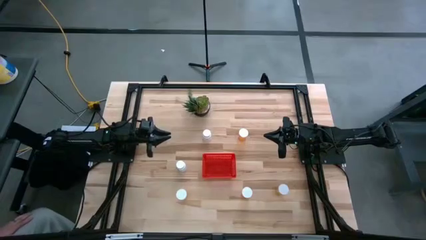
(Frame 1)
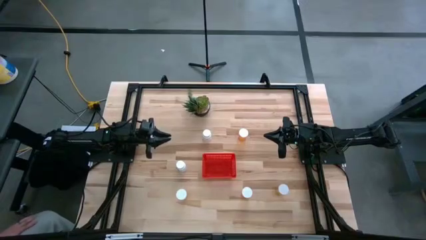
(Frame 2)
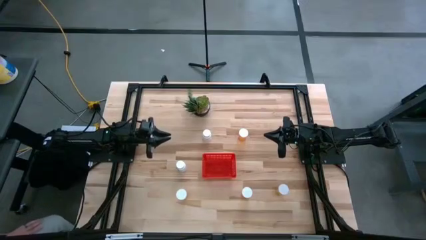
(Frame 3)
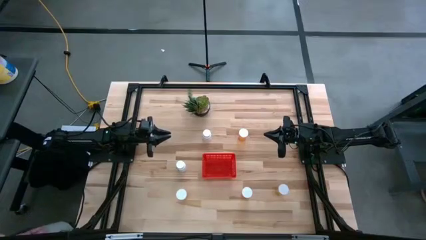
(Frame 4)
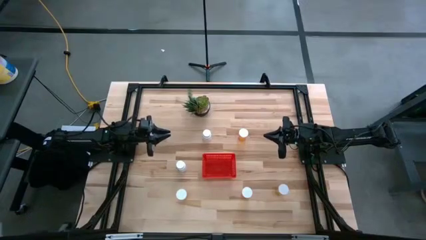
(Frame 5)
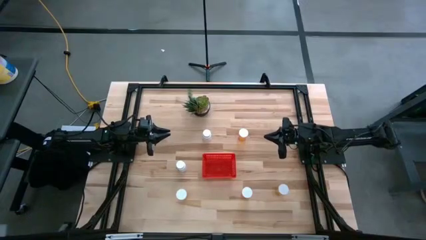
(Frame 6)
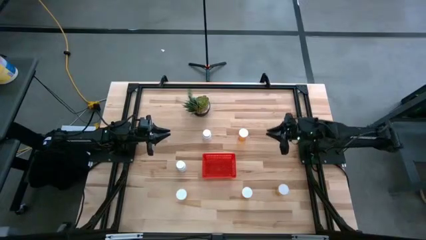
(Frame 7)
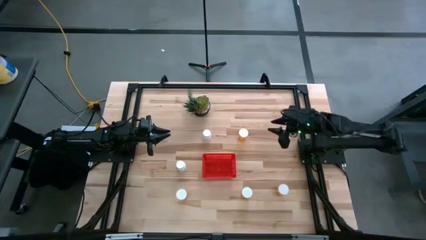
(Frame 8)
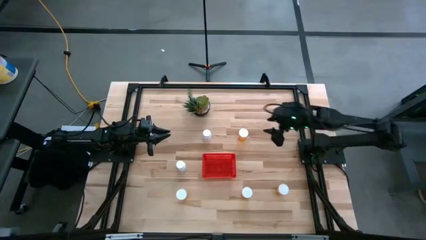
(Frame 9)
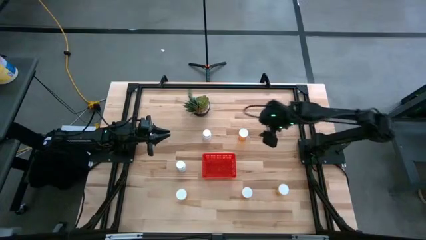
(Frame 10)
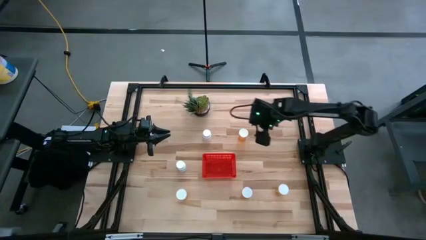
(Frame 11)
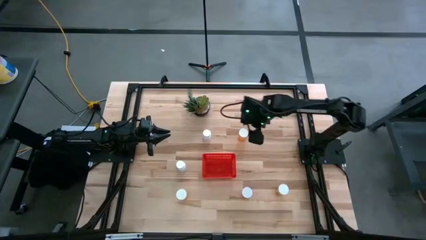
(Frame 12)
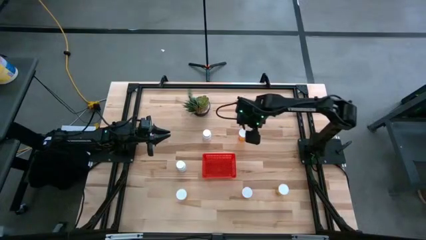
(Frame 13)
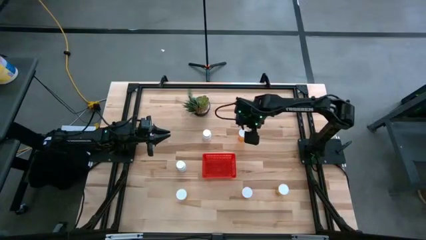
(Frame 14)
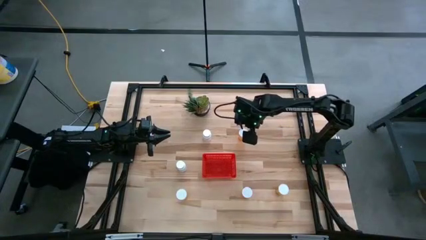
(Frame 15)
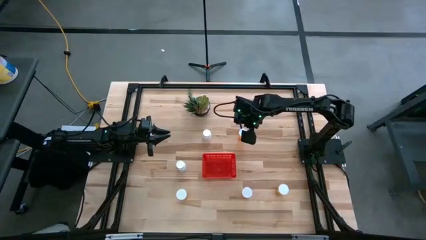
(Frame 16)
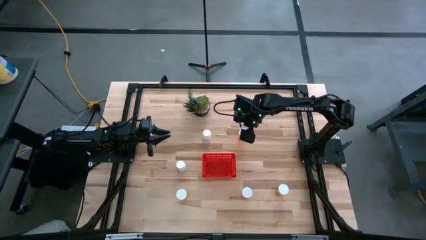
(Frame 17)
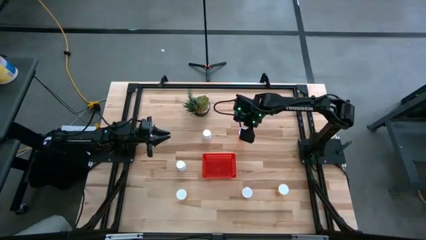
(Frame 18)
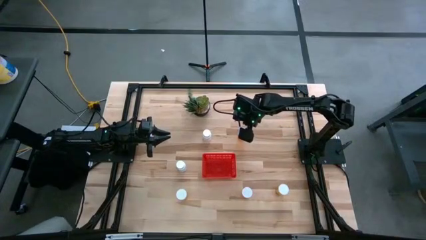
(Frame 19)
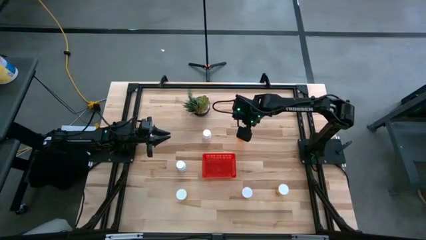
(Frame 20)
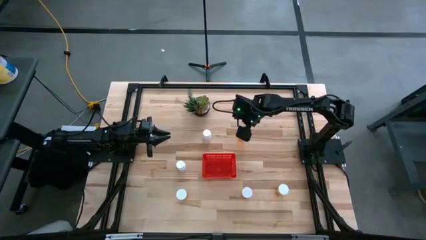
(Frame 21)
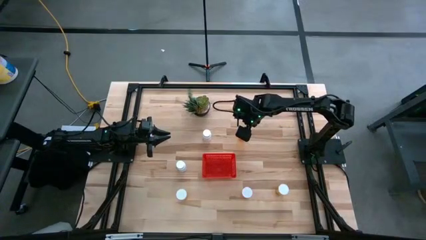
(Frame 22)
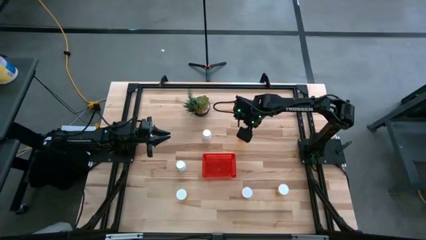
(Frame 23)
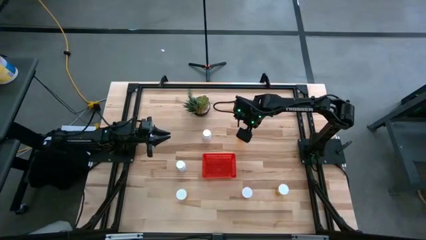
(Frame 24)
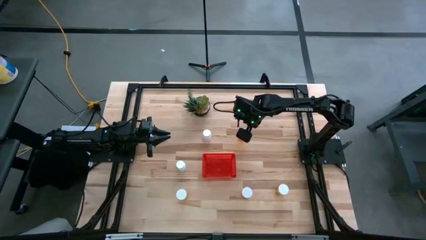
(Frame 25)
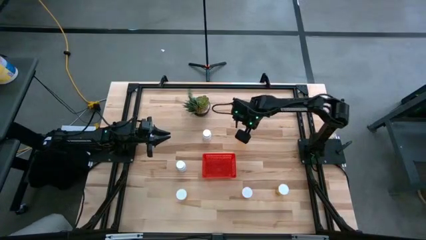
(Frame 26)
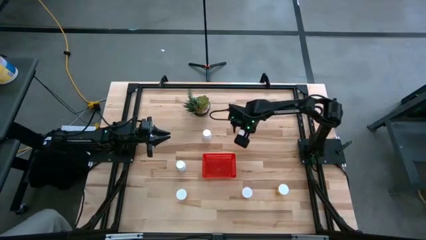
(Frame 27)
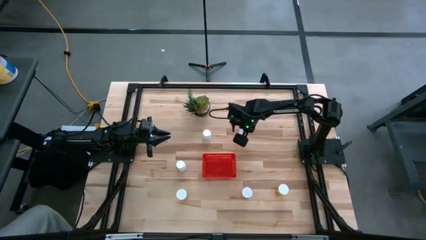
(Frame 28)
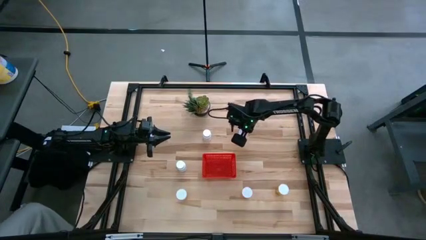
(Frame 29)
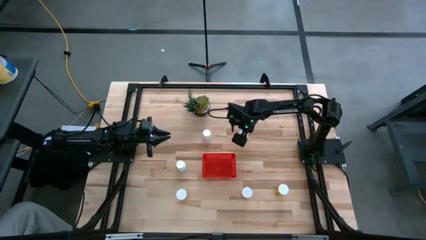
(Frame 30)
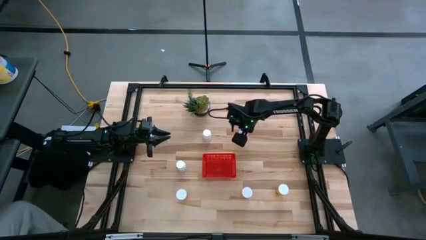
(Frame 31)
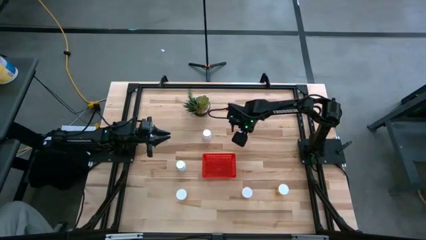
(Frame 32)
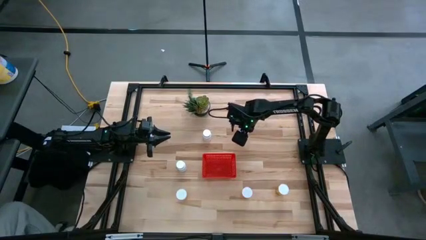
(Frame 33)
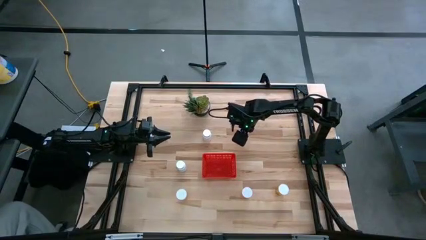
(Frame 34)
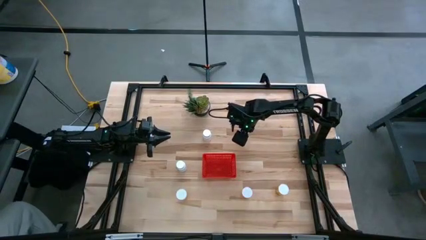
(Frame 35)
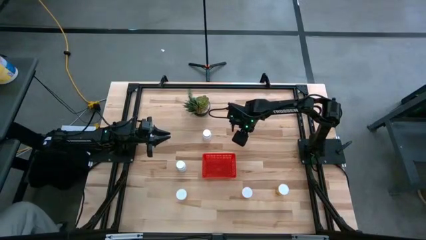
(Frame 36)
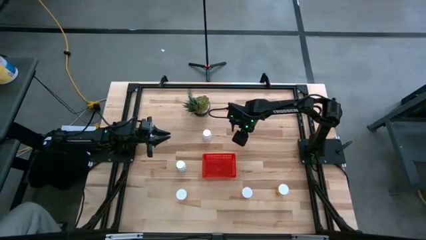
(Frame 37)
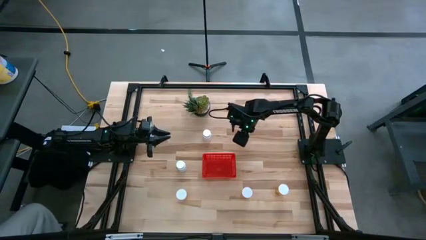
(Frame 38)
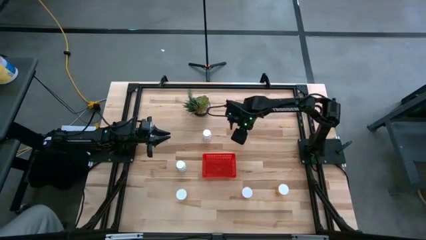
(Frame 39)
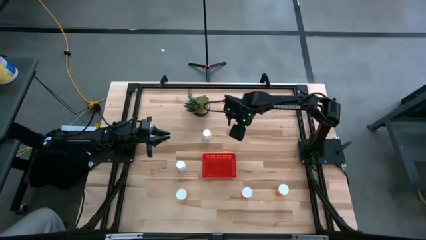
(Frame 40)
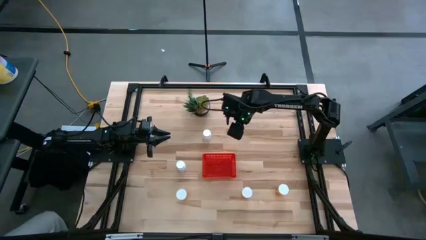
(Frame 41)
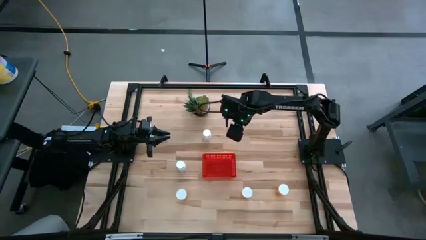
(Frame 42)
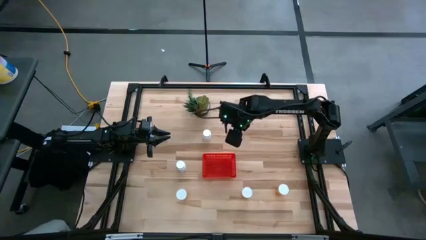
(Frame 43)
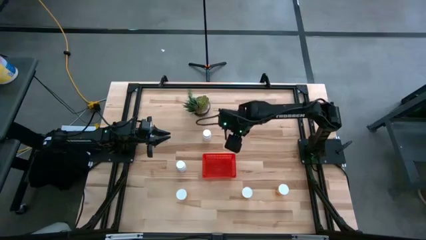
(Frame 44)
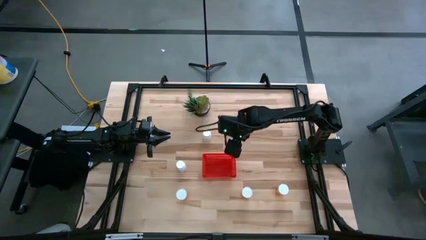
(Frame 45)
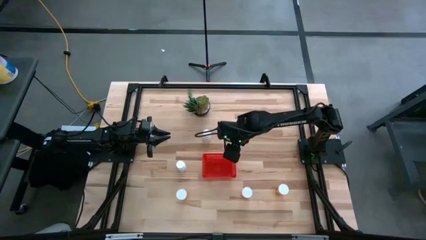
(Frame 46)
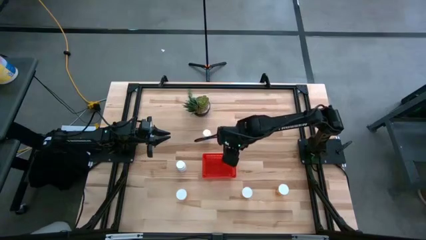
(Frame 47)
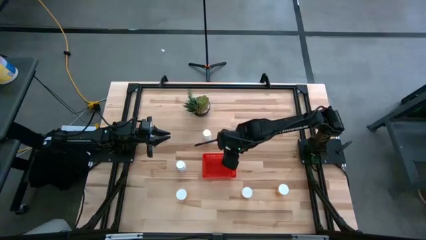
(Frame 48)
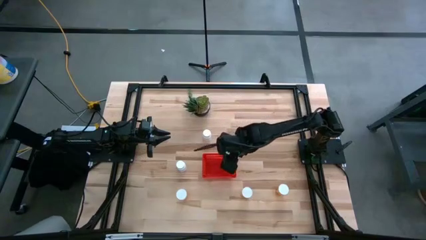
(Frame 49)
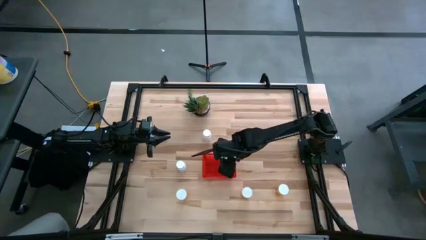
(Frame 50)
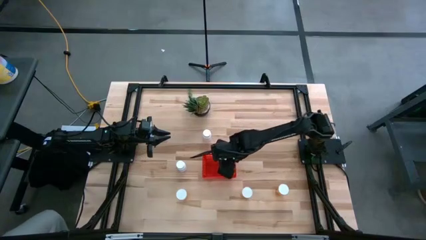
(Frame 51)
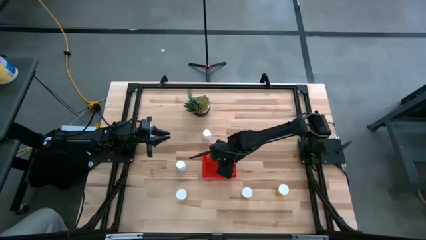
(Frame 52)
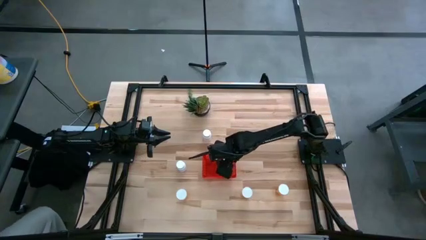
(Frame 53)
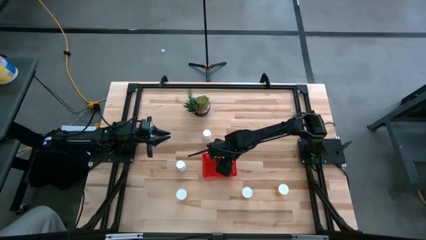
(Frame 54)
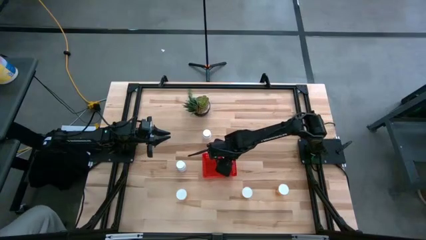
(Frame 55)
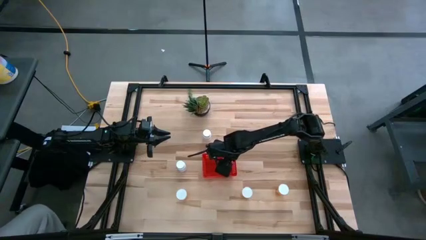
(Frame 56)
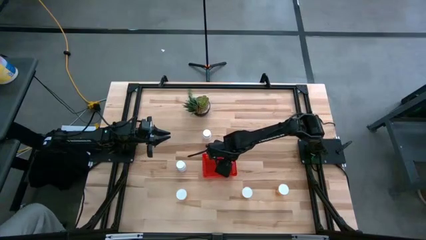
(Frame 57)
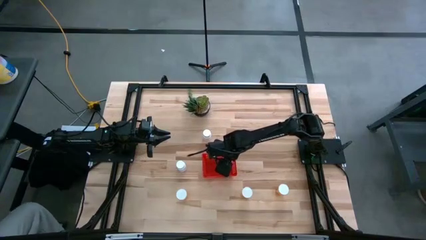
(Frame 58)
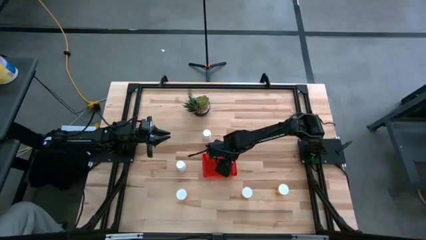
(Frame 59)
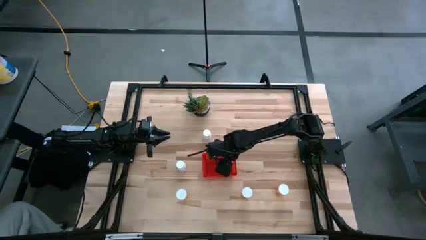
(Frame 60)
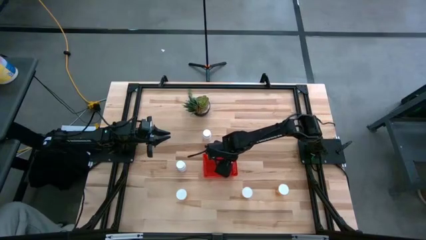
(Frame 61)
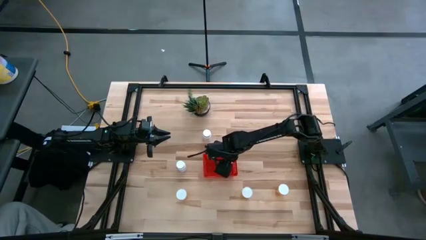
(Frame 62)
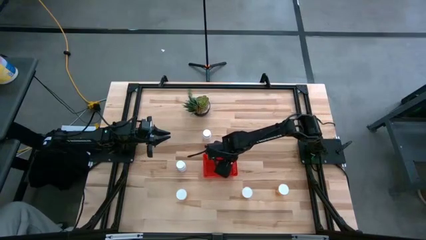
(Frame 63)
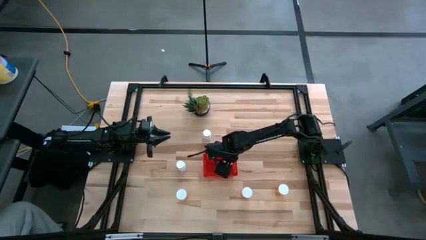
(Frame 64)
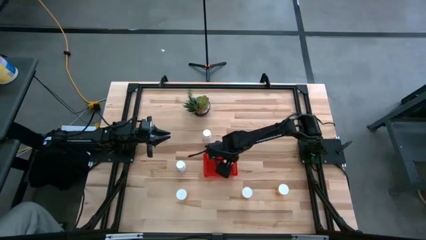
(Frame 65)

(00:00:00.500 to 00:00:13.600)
Task: Pick and place pill bottles into a basket
Put the orange pill bottle into the red bin
